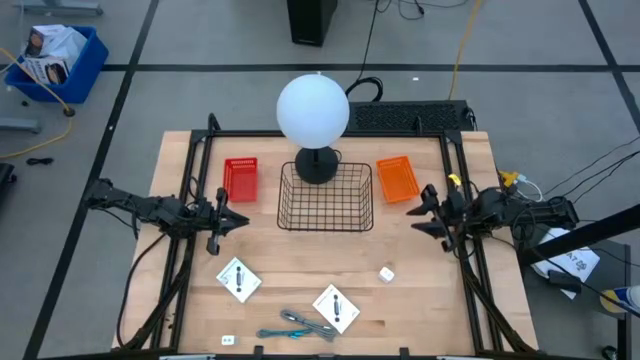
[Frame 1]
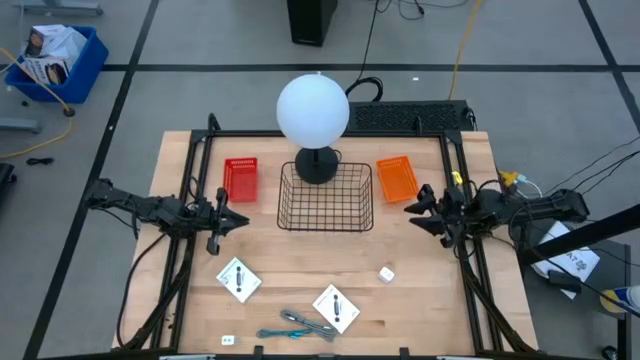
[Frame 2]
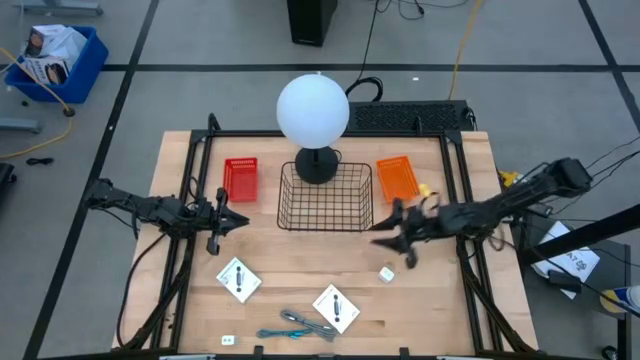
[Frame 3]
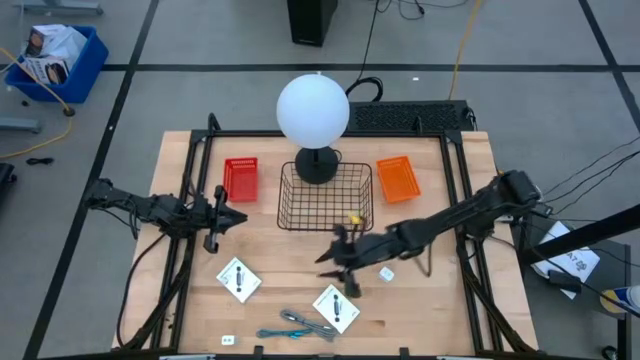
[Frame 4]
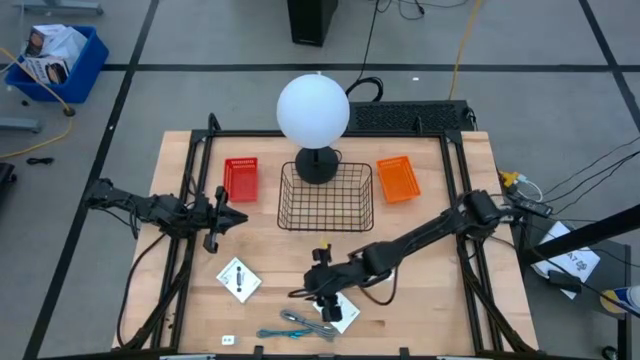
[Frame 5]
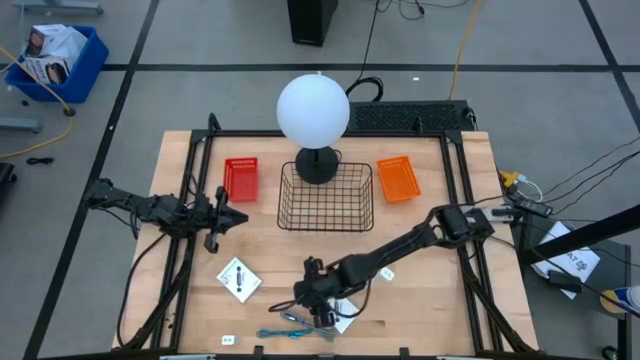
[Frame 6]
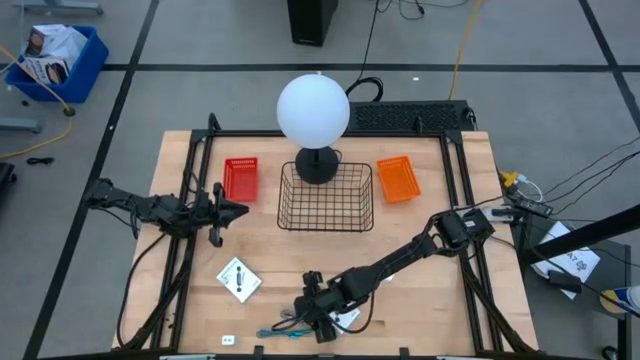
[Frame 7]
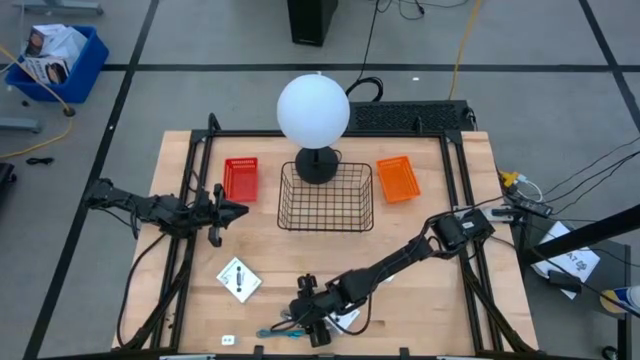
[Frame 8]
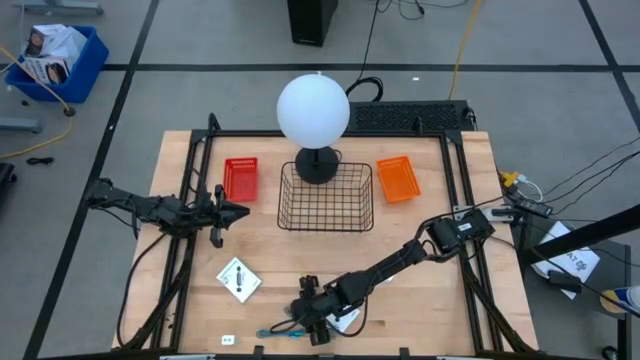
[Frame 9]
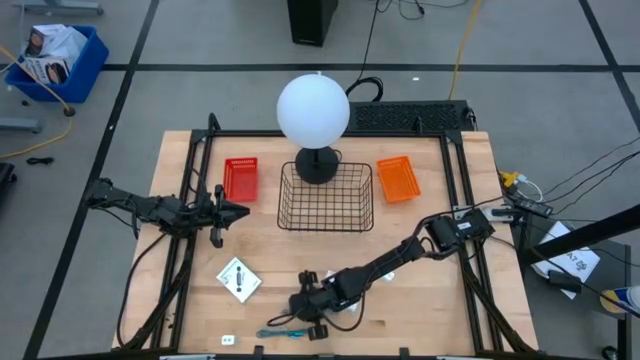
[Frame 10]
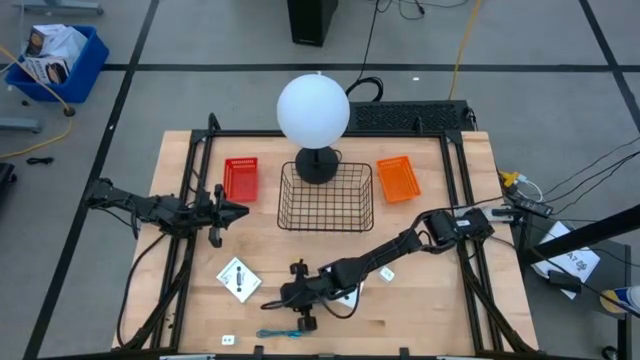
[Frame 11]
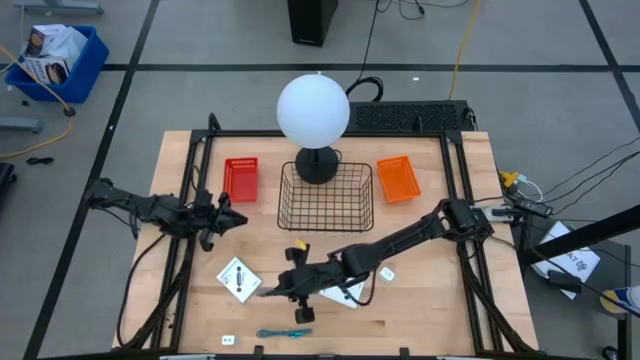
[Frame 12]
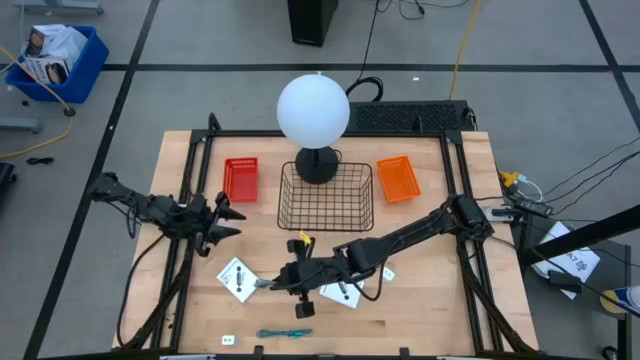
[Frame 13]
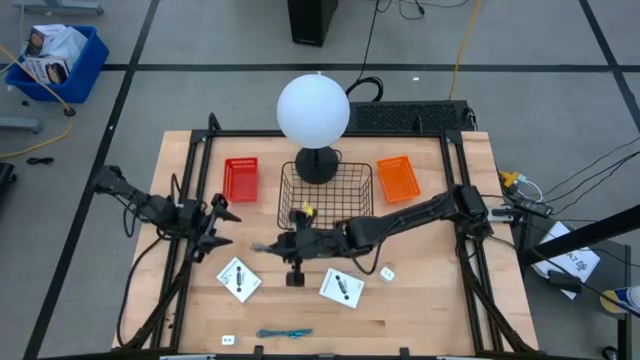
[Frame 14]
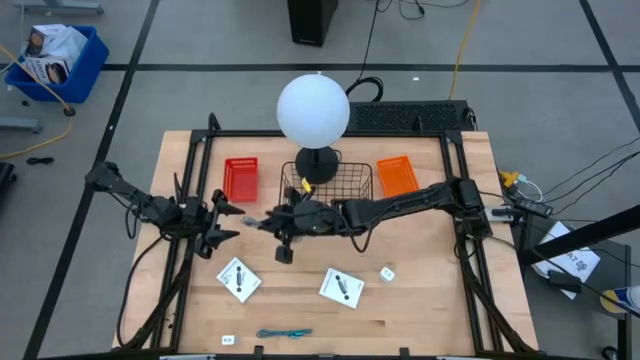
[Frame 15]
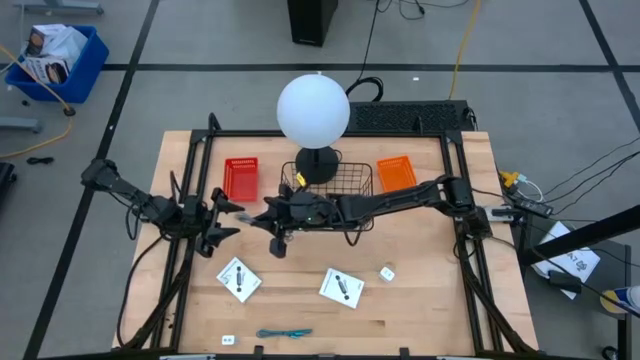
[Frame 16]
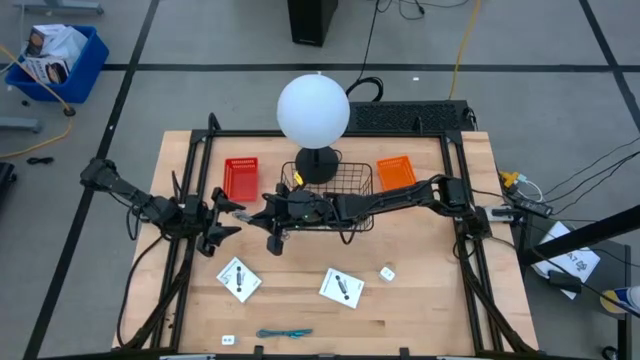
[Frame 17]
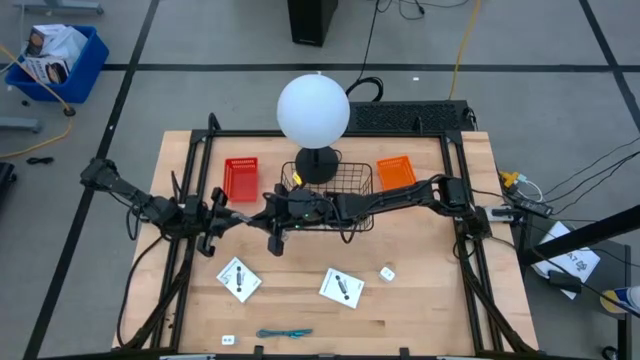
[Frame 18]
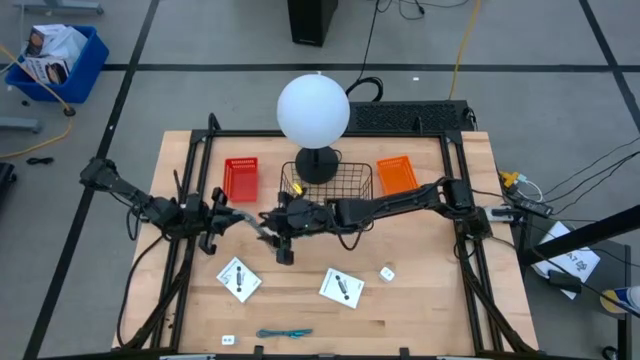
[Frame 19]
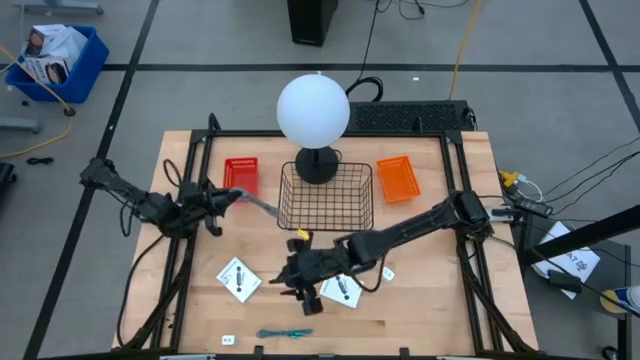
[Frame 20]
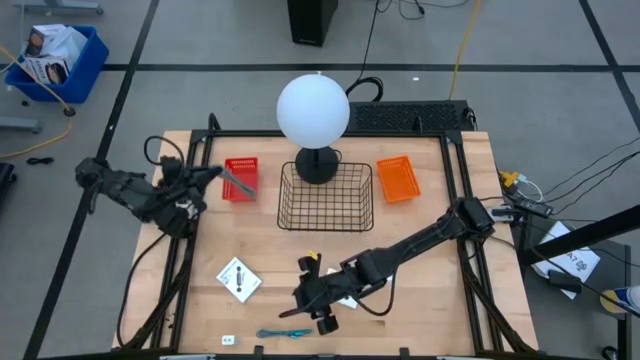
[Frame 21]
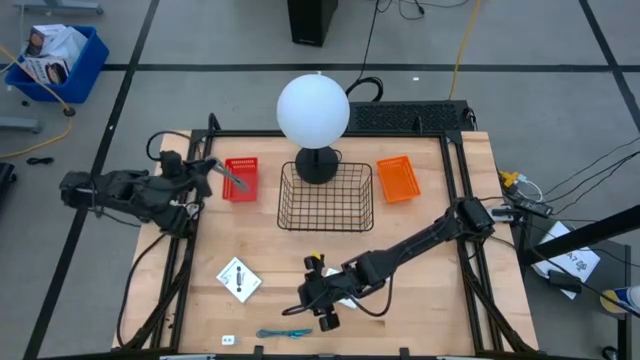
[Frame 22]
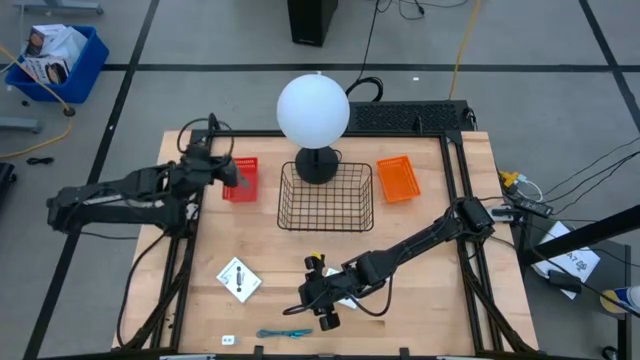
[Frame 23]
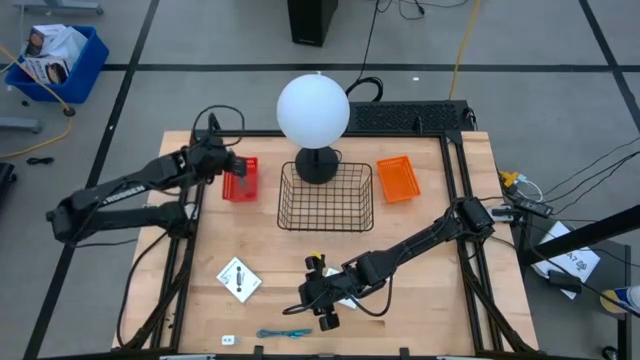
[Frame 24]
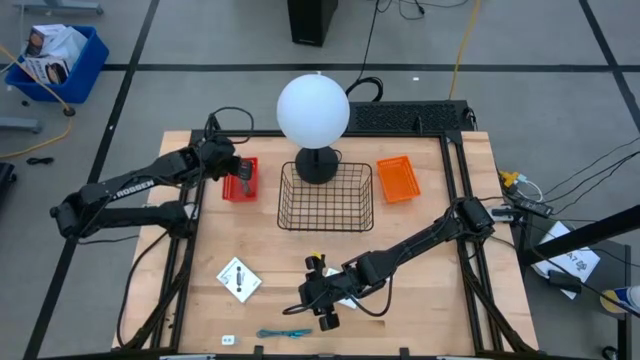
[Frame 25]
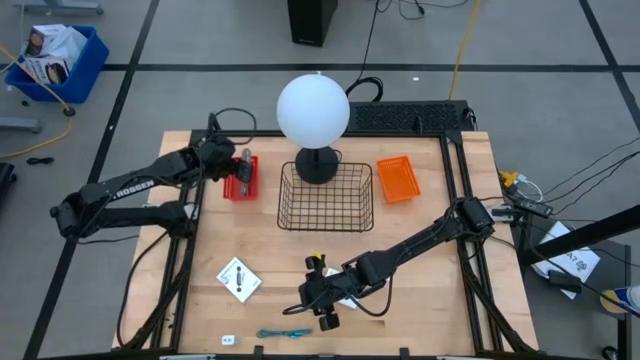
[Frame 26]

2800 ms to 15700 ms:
Task: Pick and place items into bin
Put the white black USB cable into the red bin

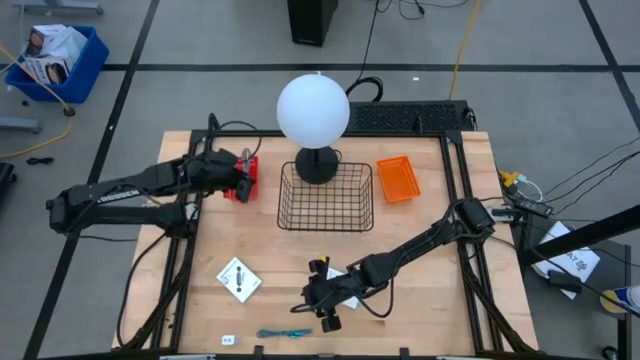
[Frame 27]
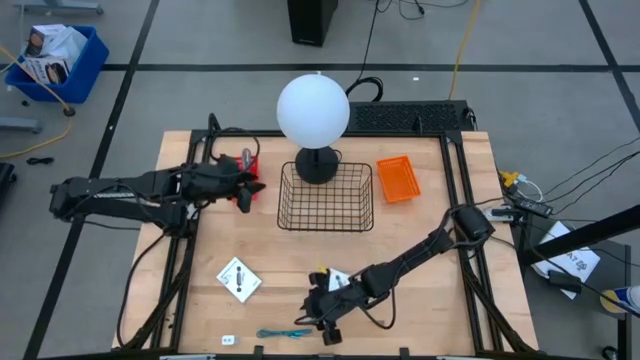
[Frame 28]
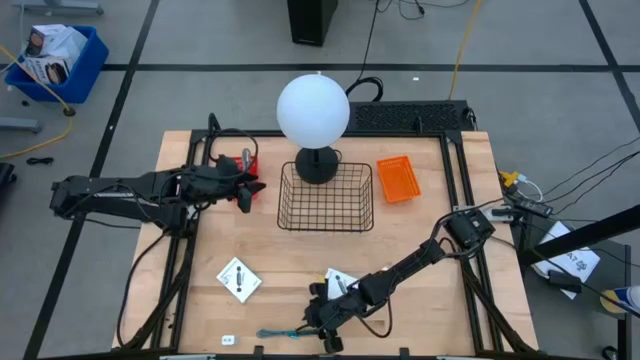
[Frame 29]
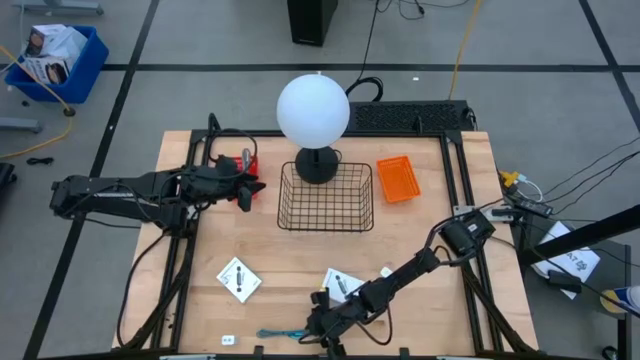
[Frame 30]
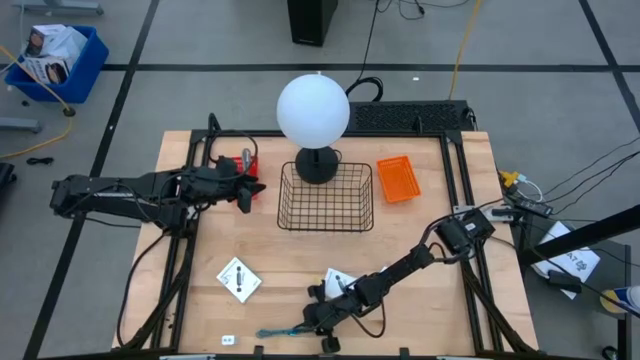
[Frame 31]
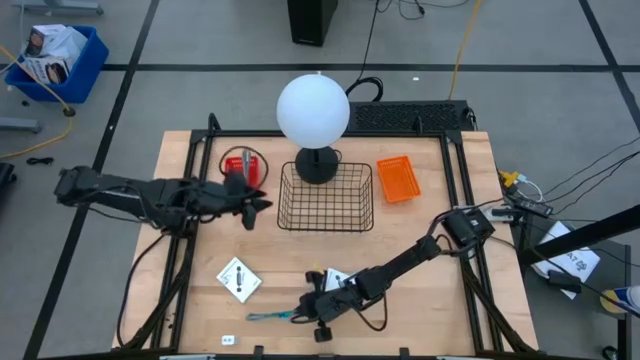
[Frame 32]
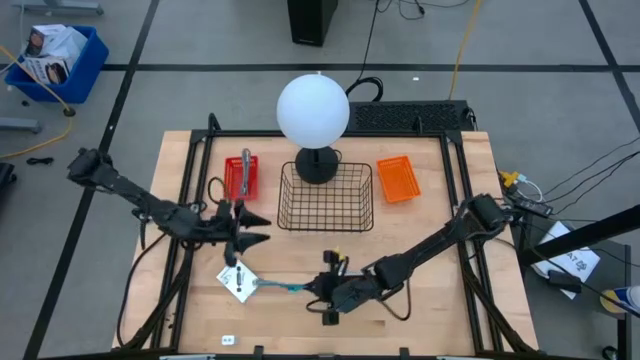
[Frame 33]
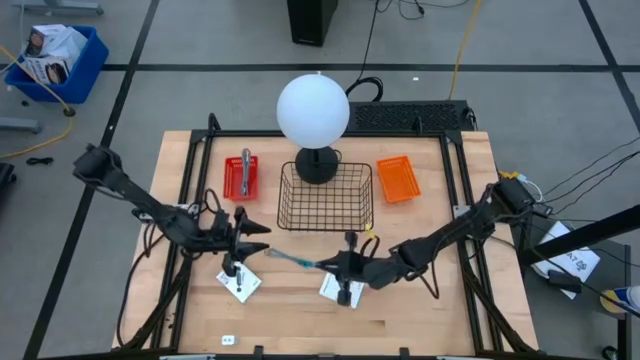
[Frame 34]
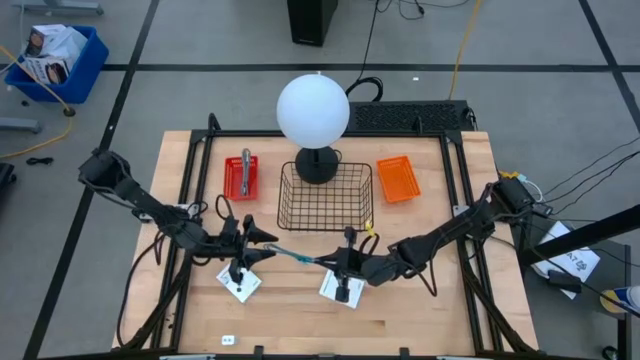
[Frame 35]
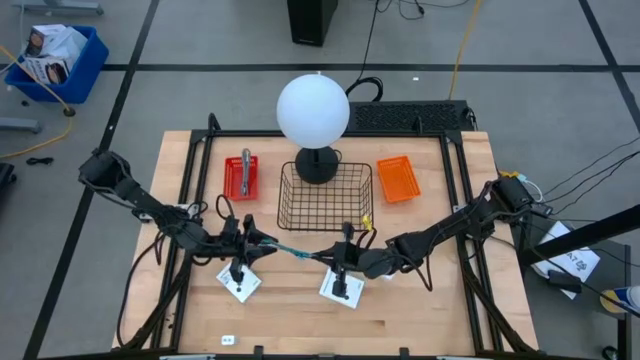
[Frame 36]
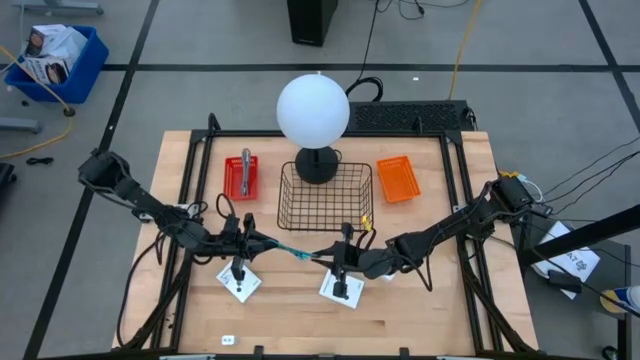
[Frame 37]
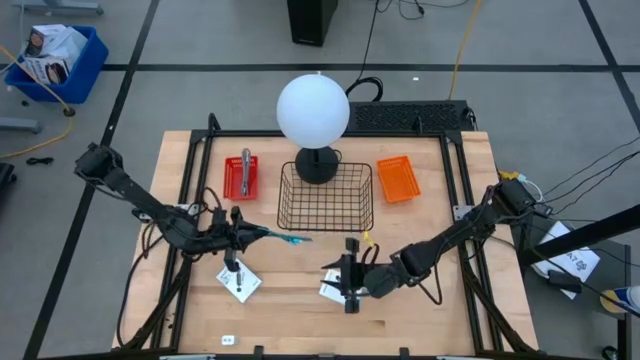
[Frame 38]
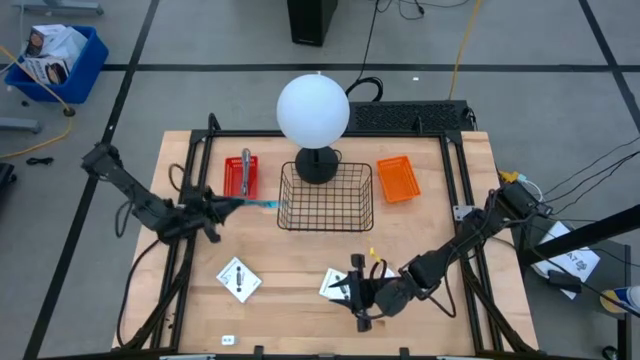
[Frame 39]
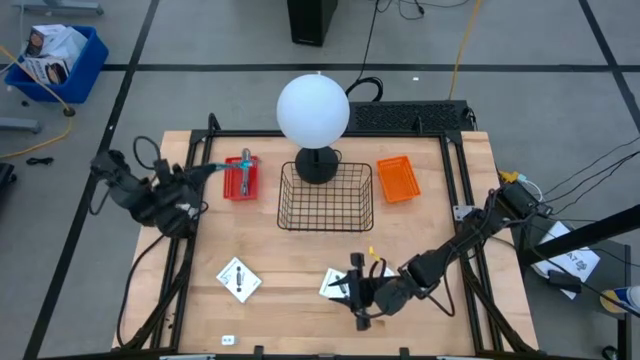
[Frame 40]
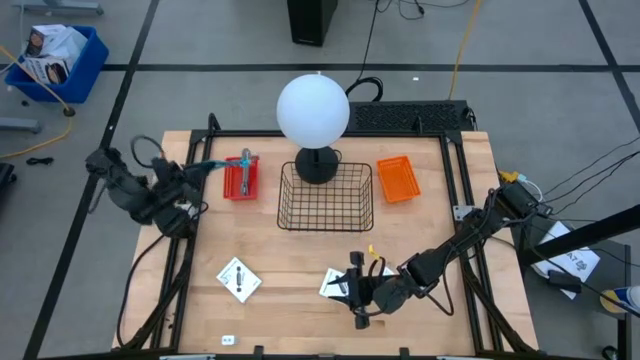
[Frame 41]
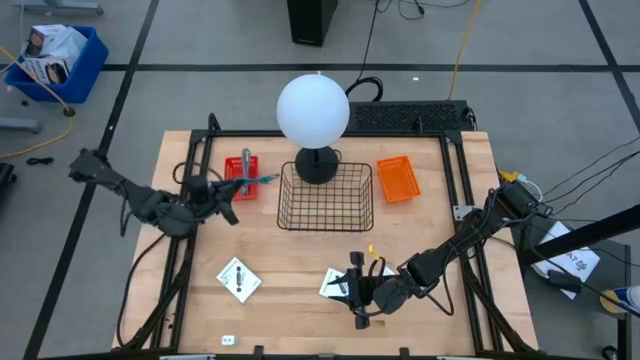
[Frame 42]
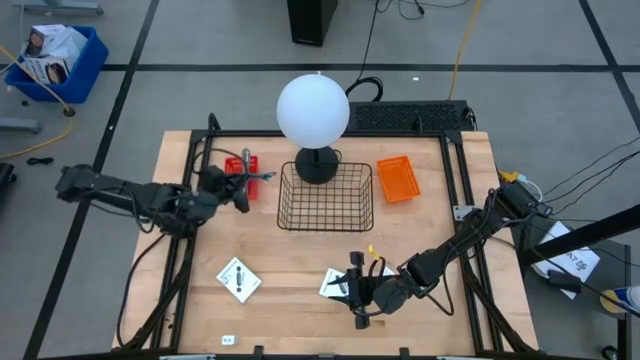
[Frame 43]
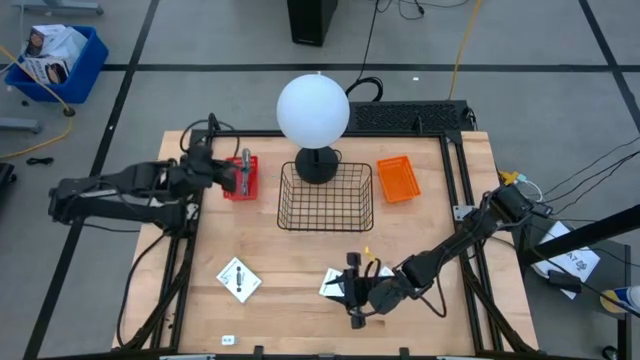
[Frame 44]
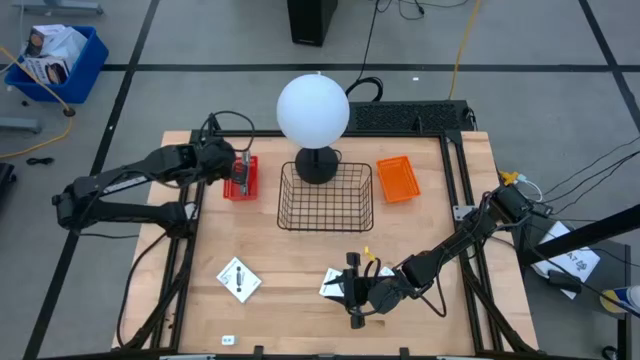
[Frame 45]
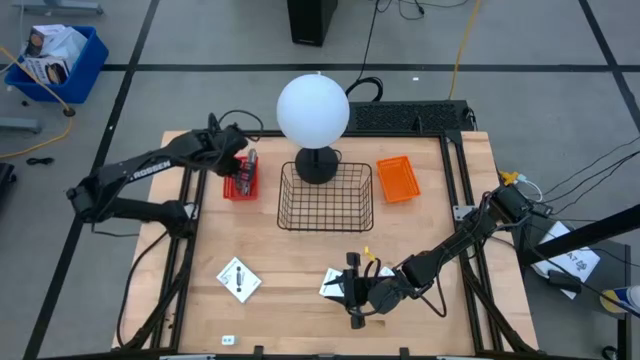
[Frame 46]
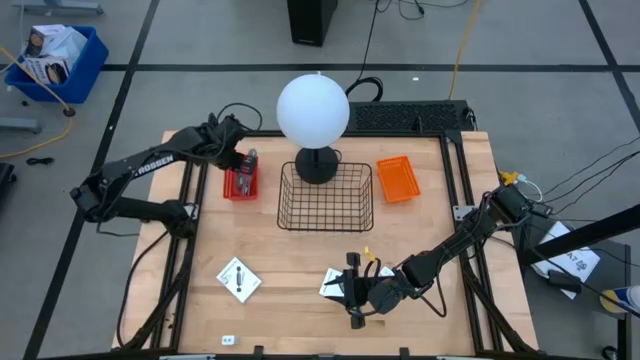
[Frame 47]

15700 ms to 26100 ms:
Put the blue black USB cable into the red bin
